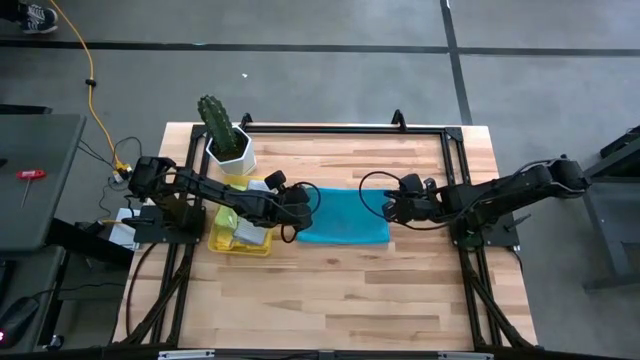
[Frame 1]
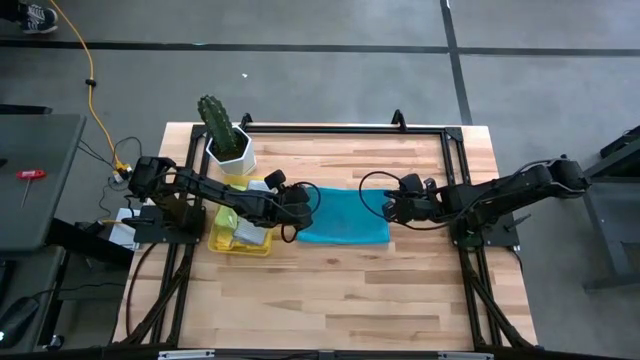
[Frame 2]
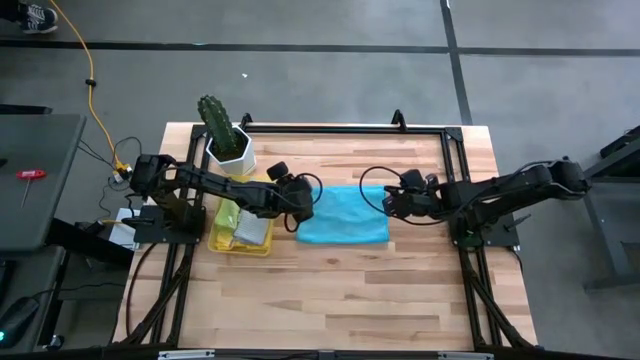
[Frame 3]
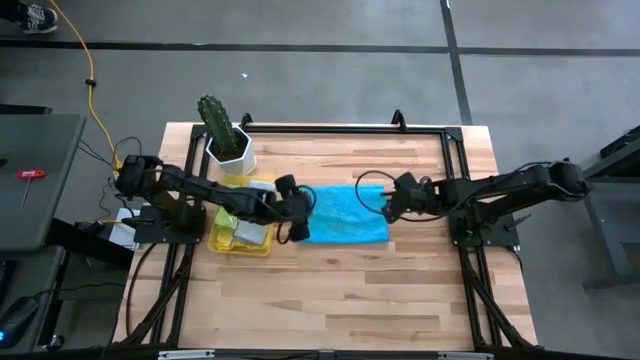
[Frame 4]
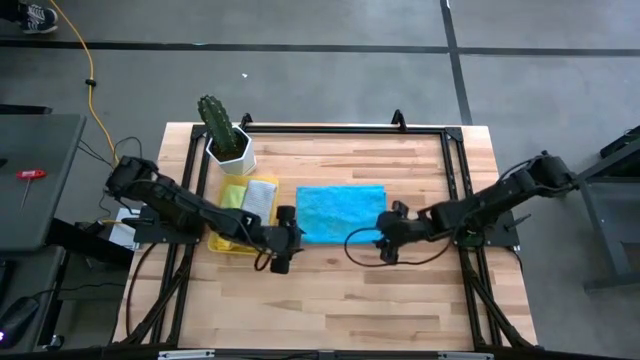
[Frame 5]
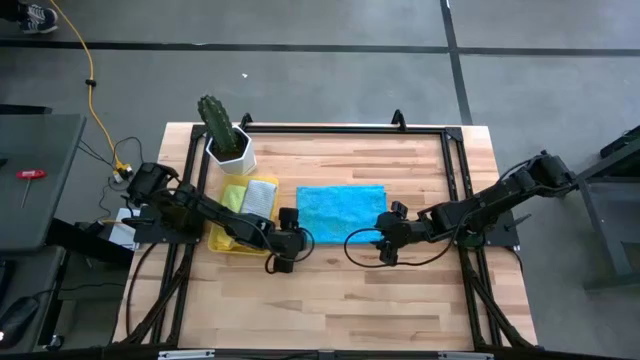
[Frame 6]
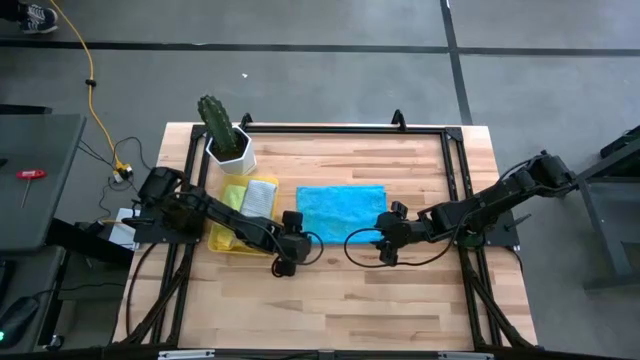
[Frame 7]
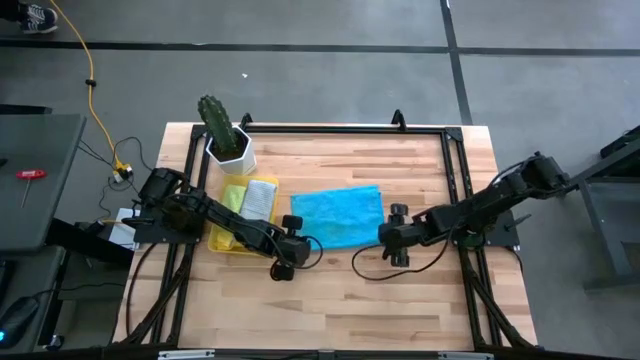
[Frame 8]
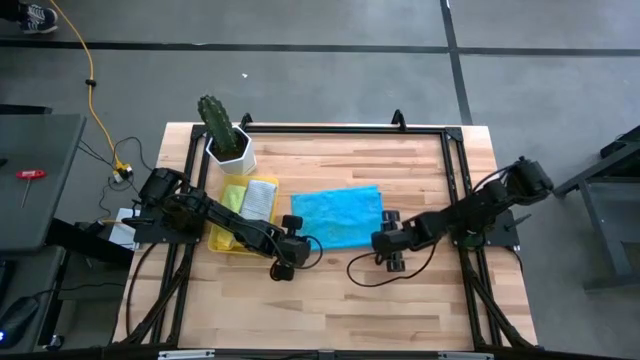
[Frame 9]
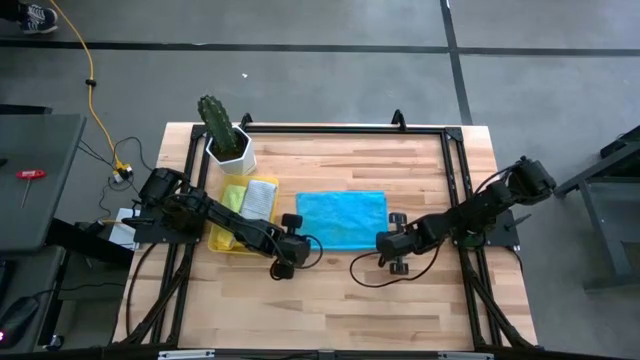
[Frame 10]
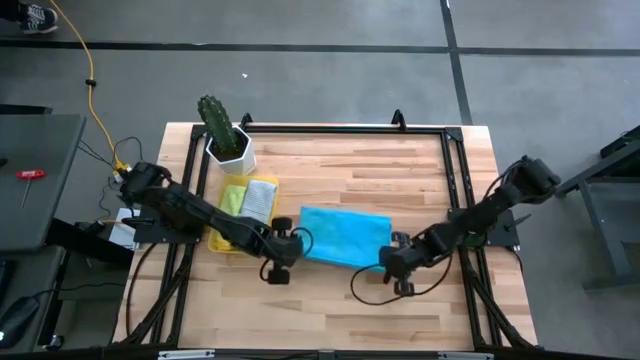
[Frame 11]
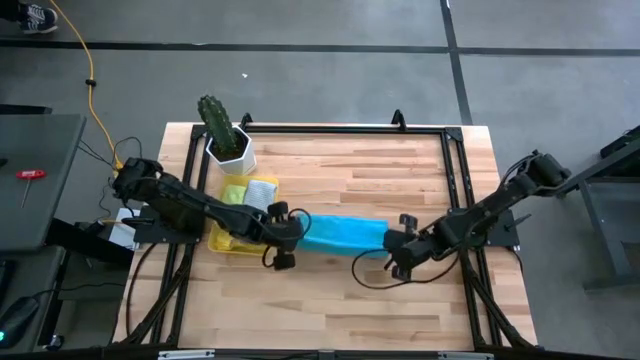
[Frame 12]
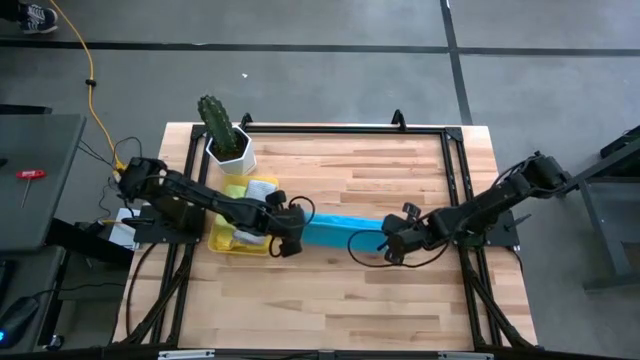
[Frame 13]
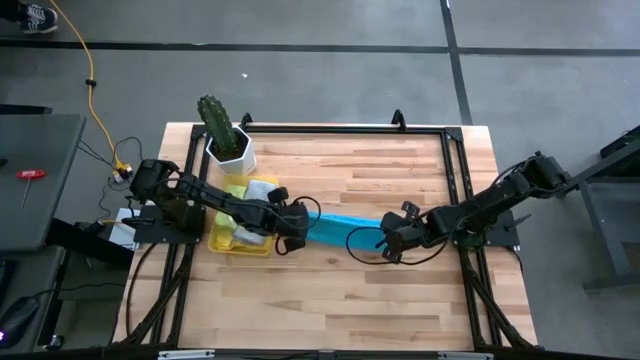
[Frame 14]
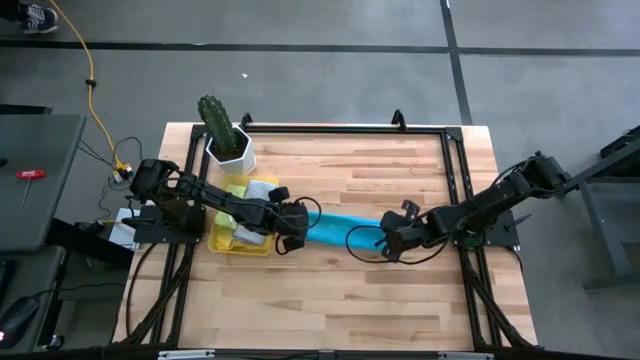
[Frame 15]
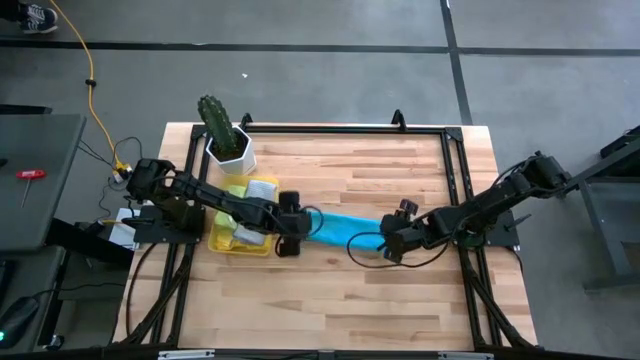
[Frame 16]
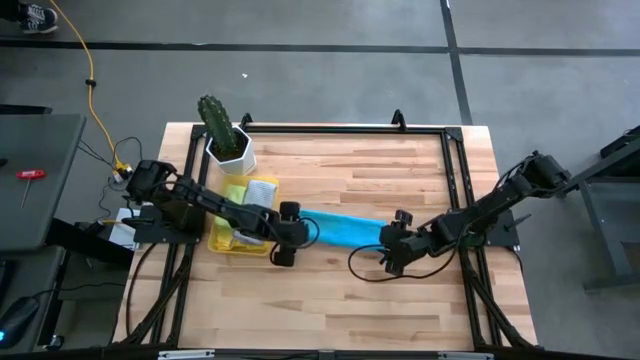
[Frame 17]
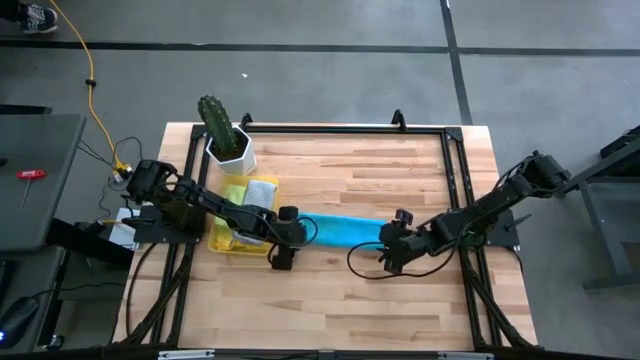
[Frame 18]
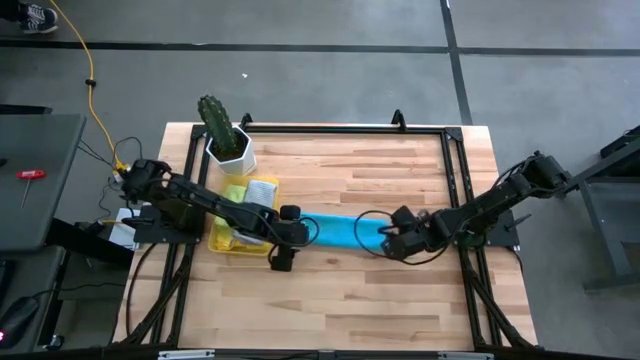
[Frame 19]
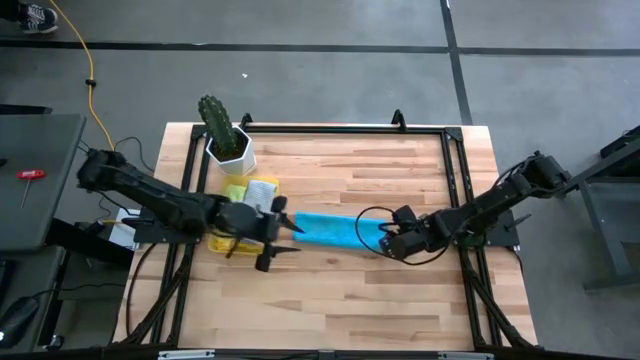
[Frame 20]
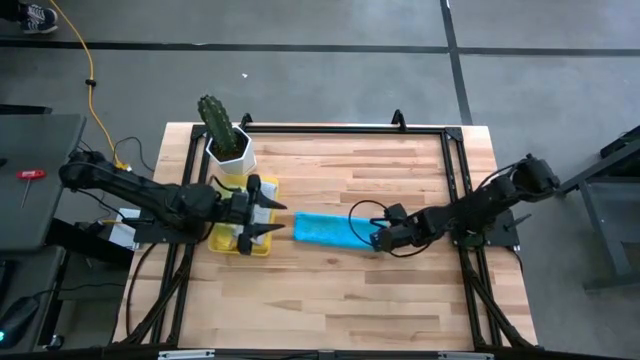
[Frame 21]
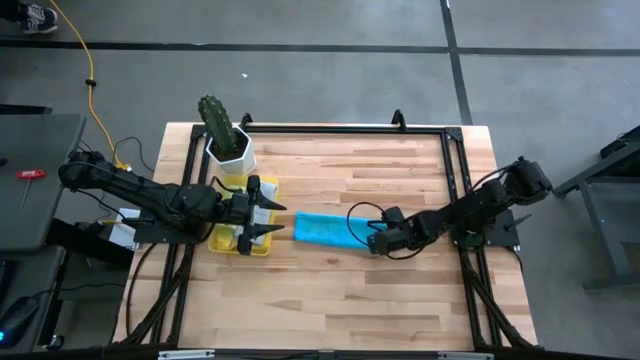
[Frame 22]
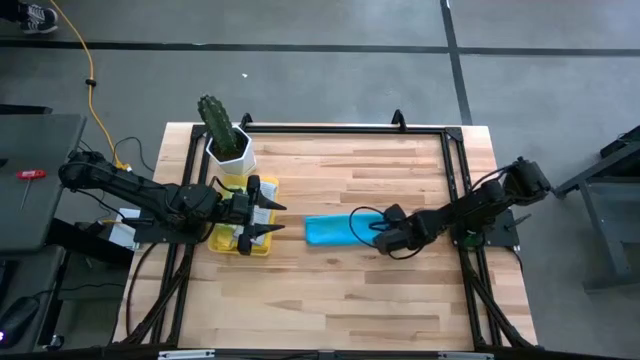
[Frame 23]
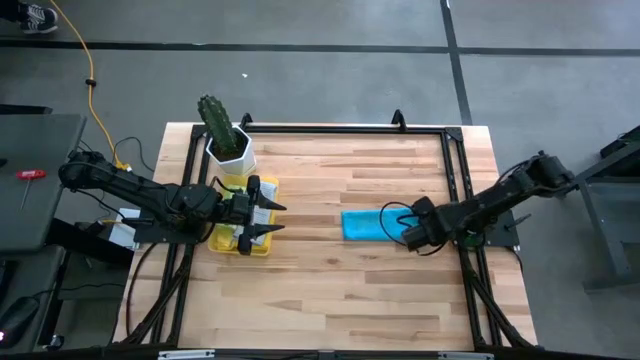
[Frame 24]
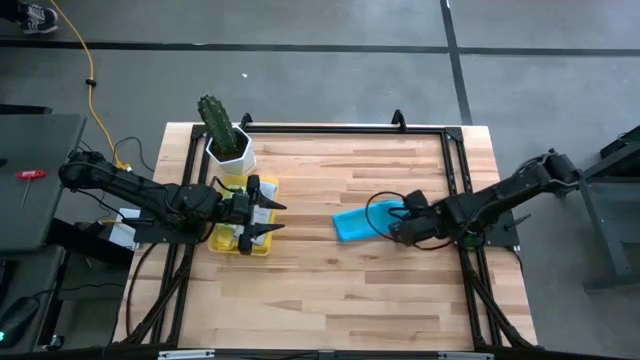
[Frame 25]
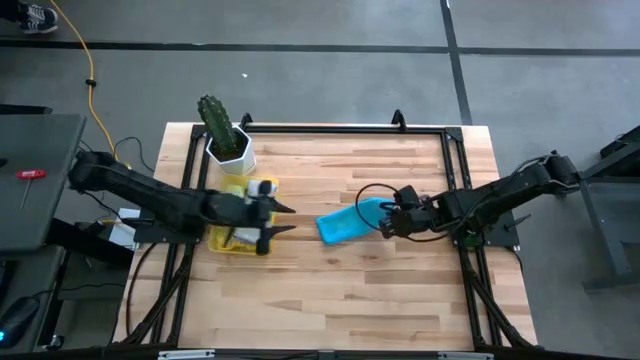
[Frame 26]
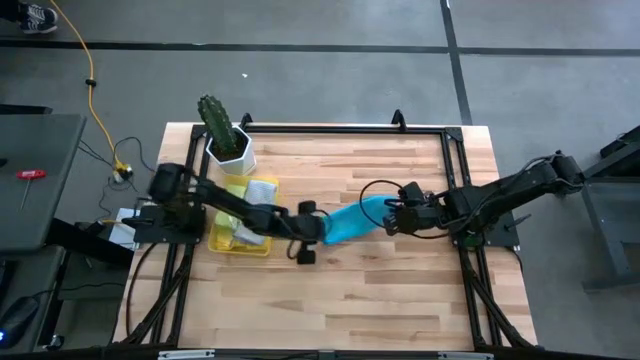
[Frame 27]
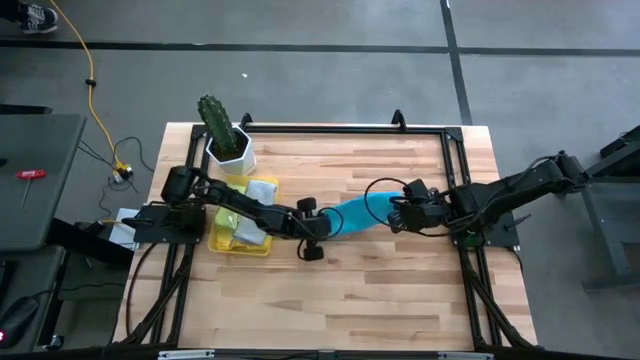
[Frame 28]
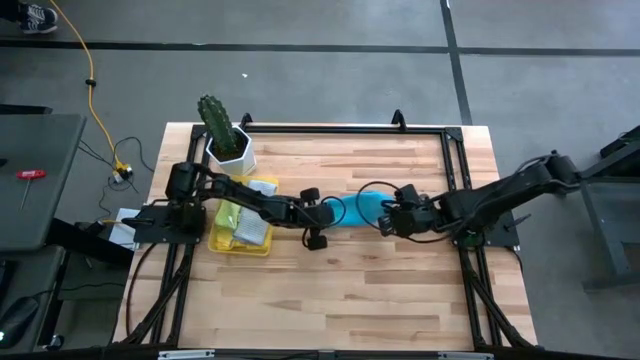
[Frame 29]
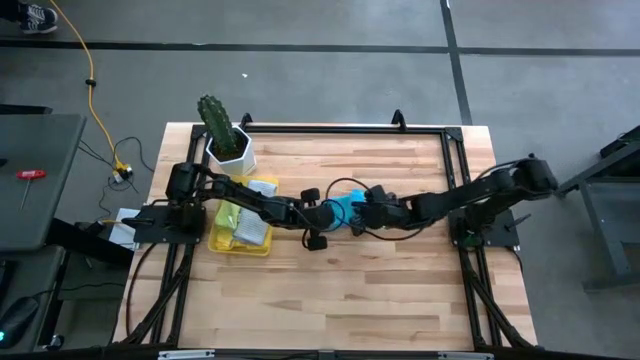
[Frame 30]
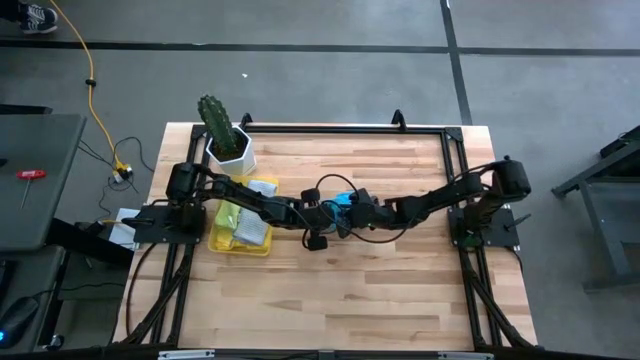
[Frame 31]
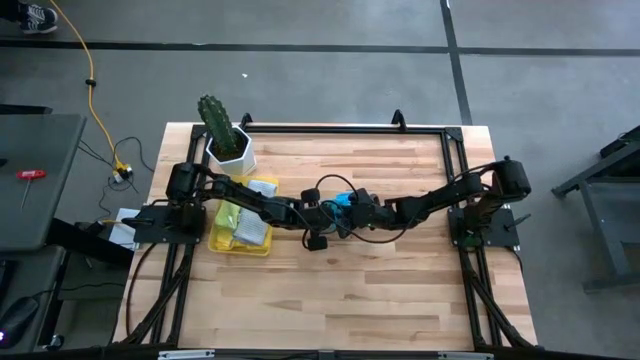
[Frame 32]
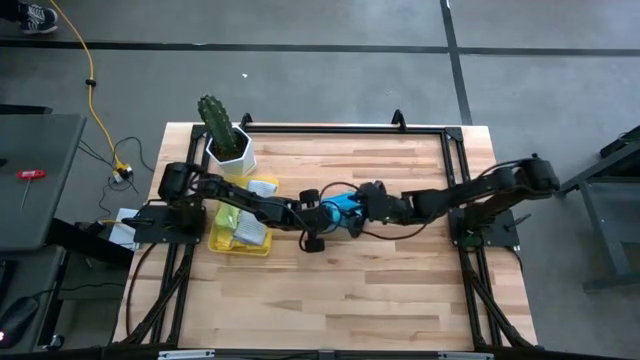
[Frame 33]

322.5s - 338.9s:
Task: Fold microfiber towels
Fold the blue microfiber towel

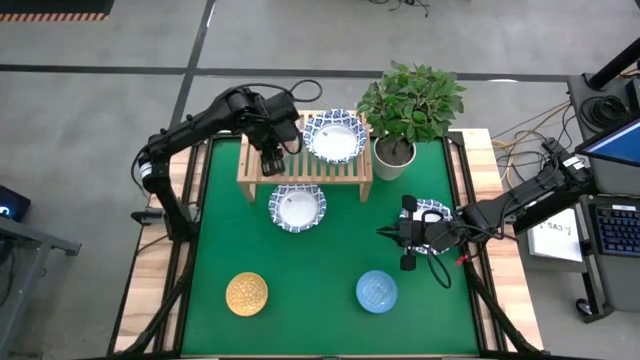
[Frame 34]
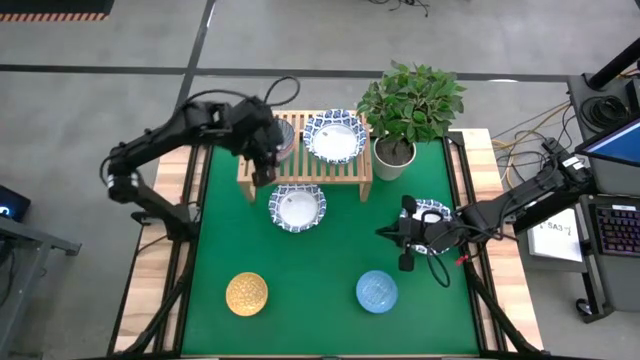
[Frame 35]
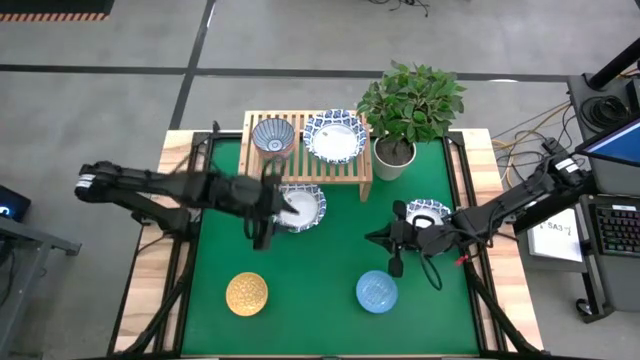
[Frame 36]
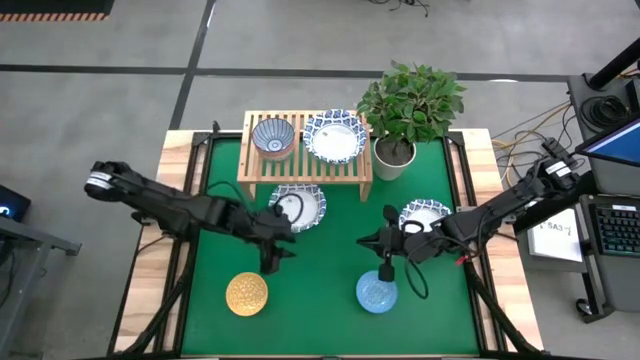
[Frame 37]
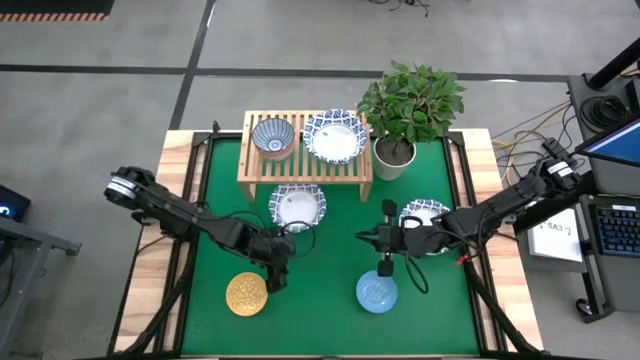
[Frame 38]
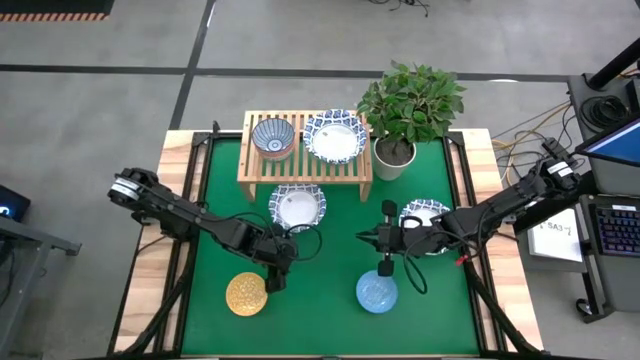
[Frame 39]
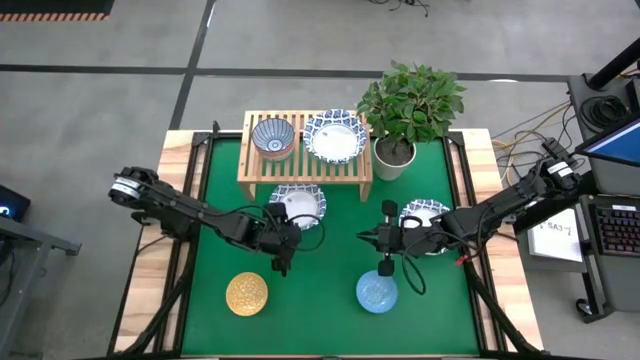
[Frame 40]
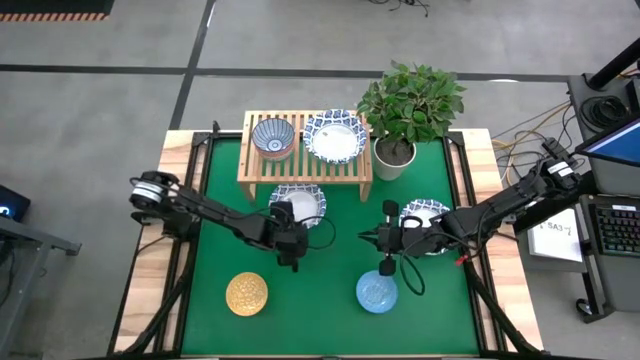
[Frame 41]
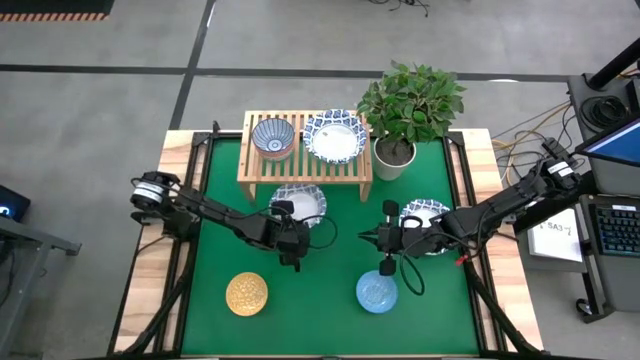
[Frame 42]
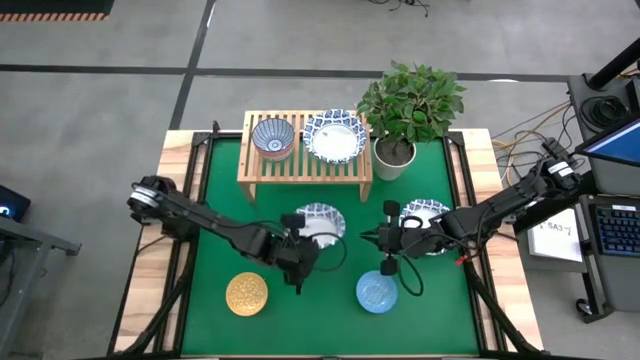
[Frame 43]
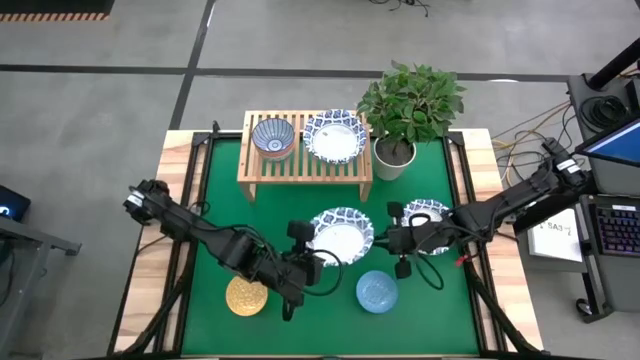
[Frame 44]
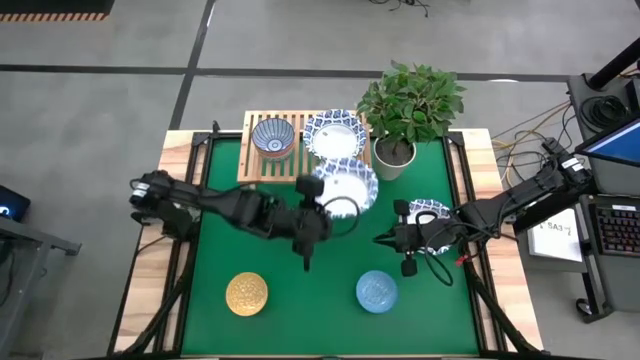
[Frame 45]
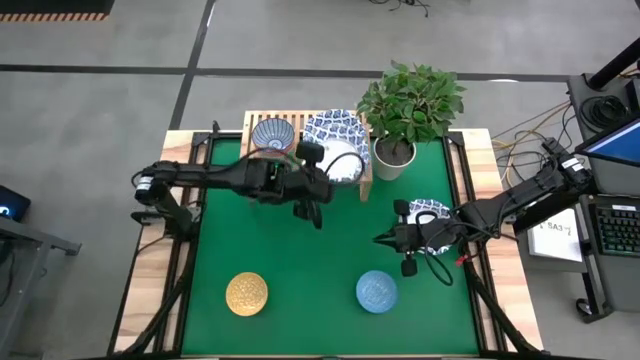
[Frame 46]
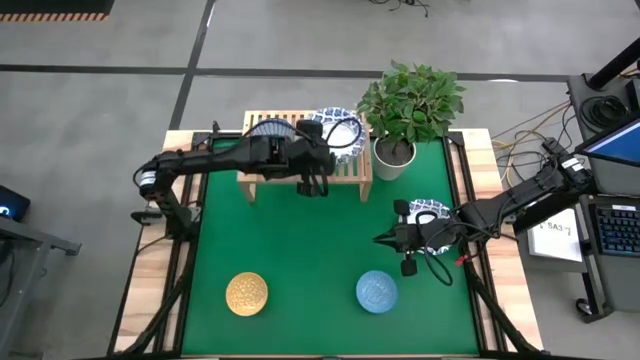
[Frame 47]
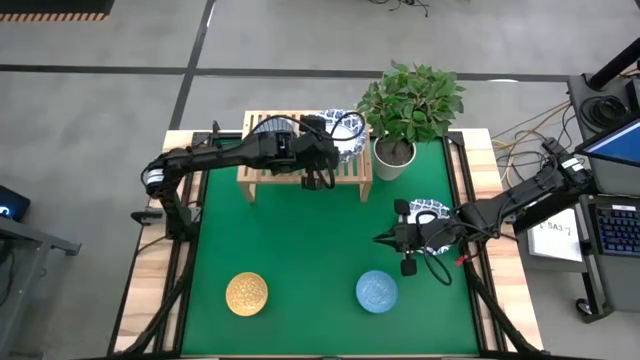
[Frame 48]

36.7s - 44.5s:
Task: Place and stack plates onto a shelf
Stack the left white and blue bowl on top of the white and blue bowl on the shelf
